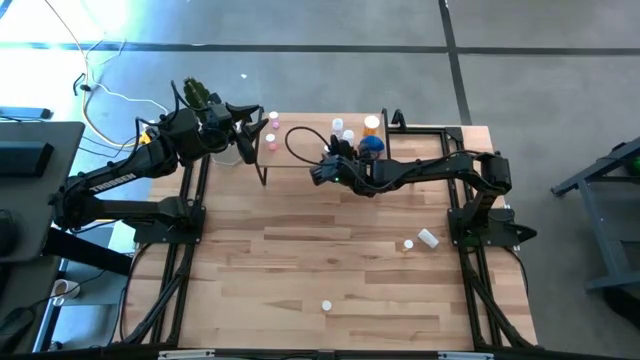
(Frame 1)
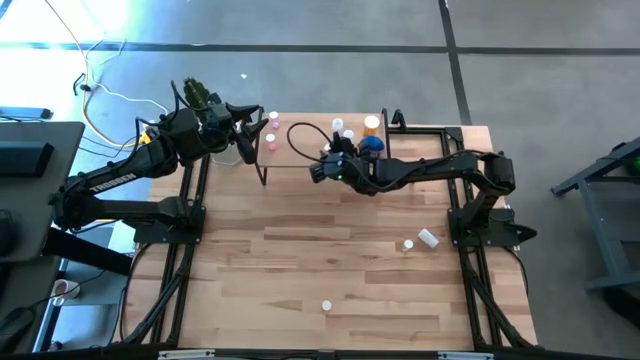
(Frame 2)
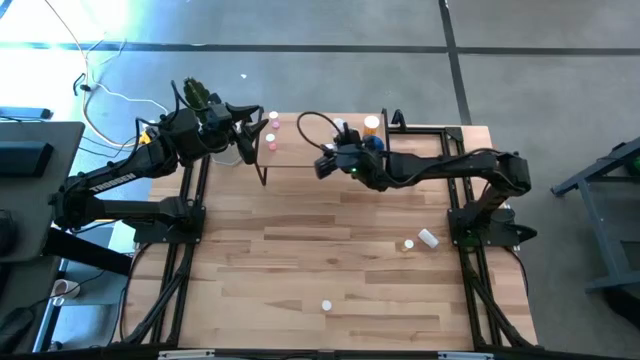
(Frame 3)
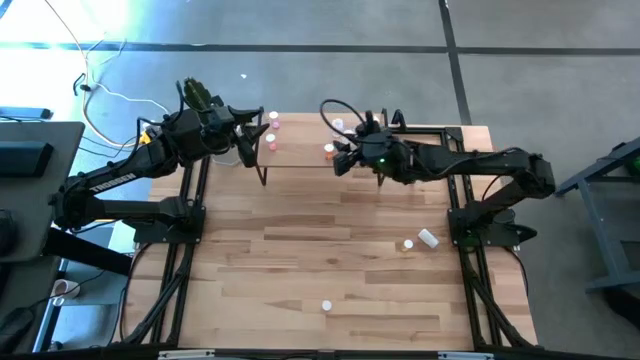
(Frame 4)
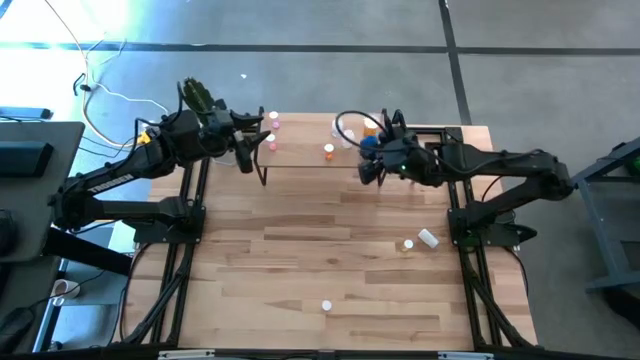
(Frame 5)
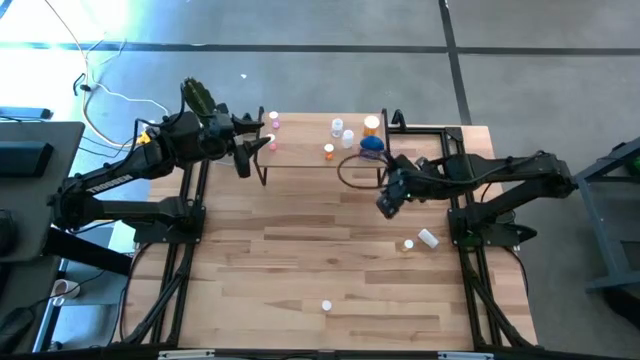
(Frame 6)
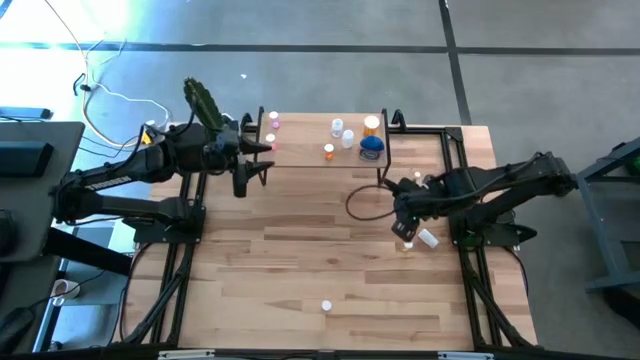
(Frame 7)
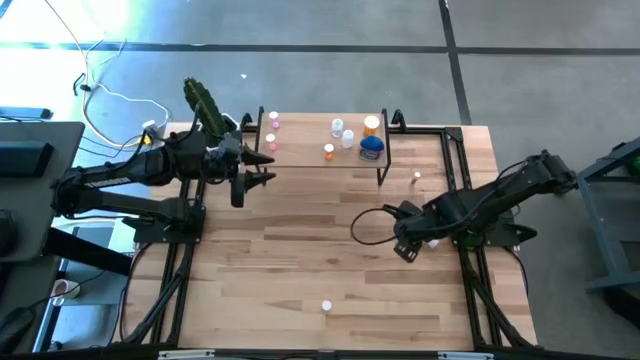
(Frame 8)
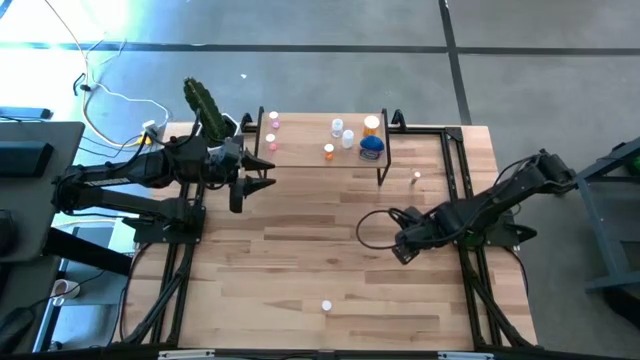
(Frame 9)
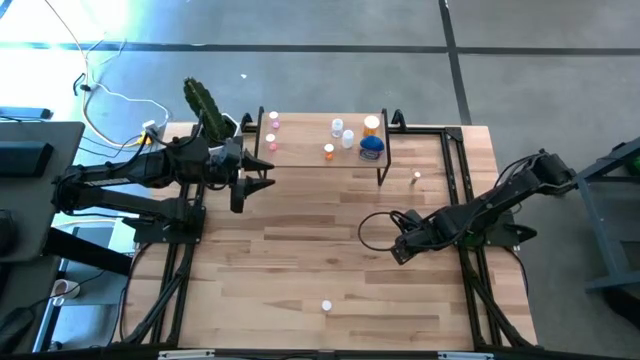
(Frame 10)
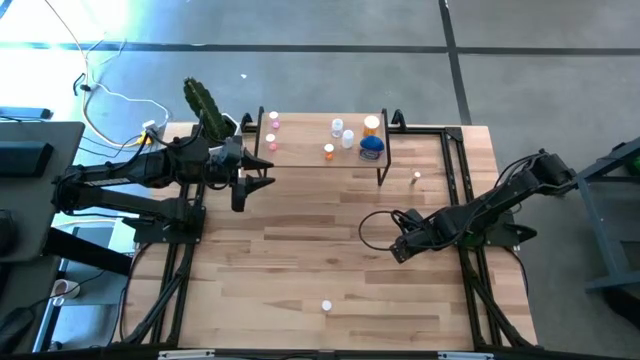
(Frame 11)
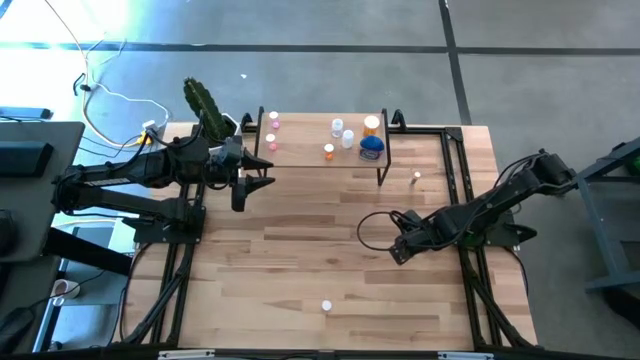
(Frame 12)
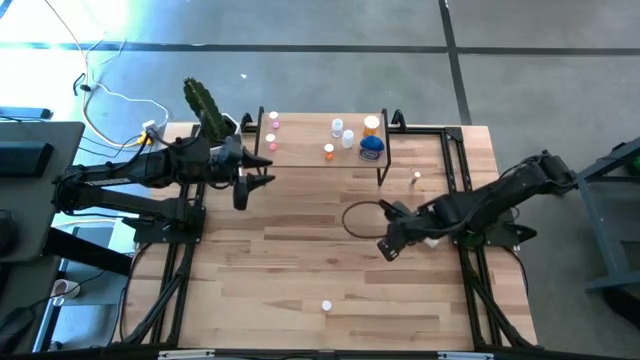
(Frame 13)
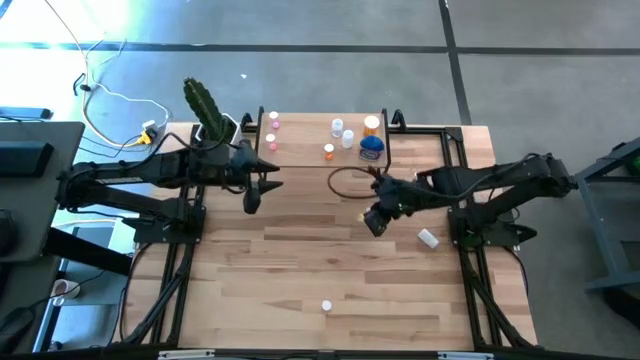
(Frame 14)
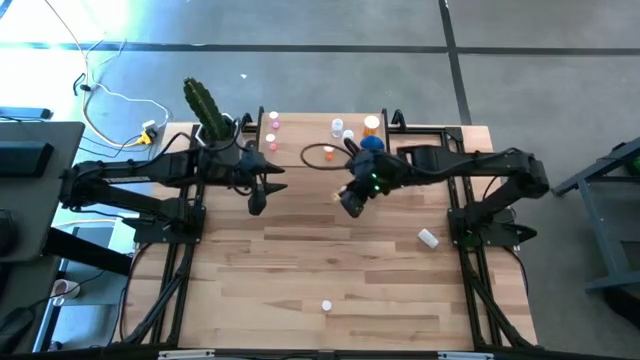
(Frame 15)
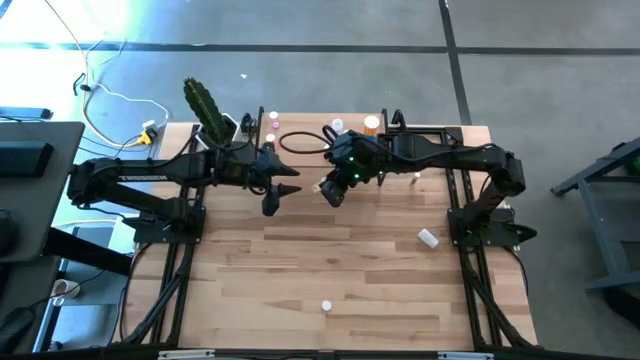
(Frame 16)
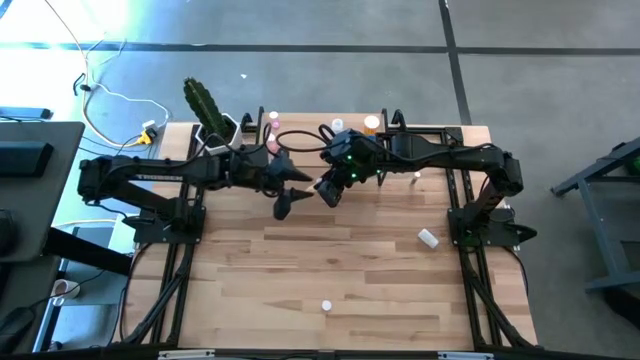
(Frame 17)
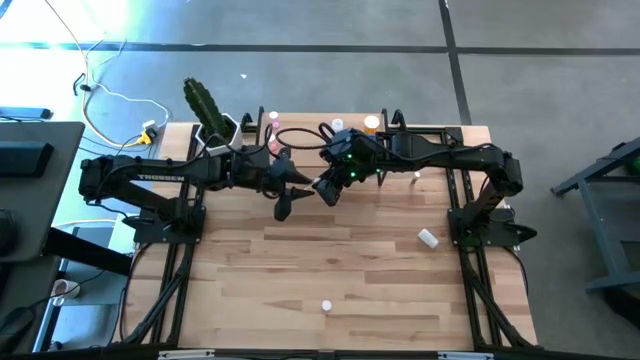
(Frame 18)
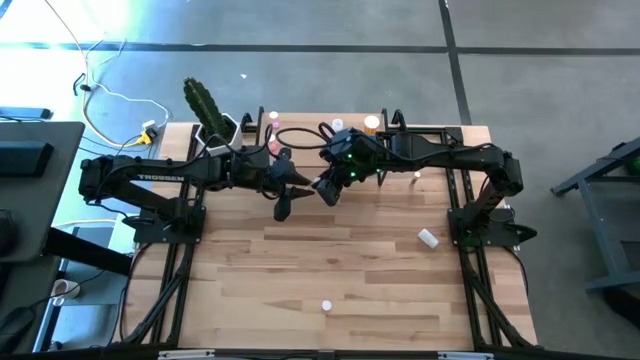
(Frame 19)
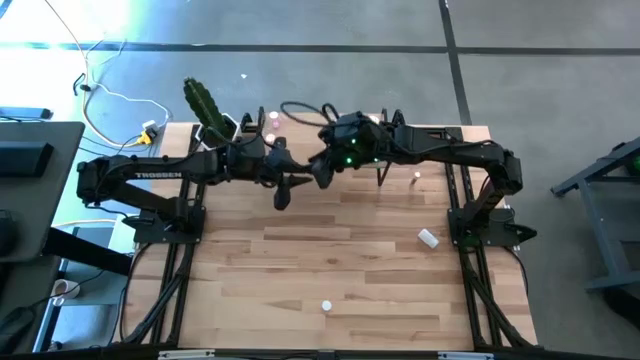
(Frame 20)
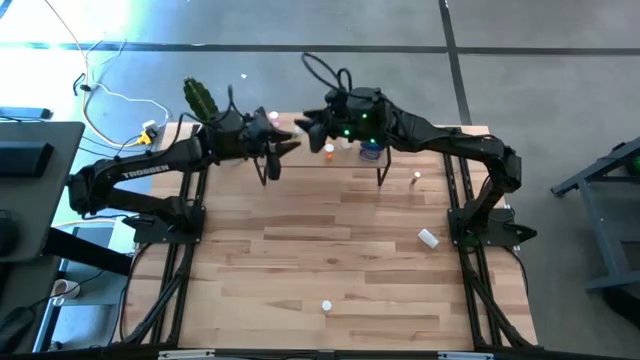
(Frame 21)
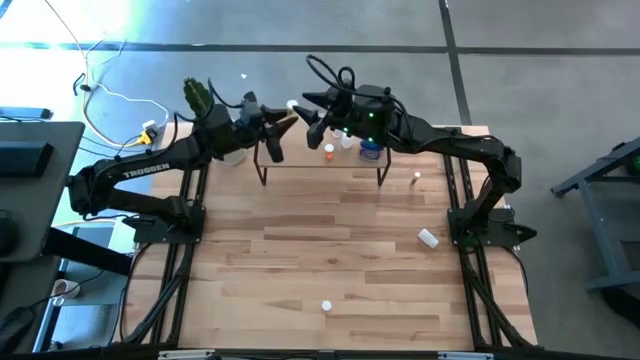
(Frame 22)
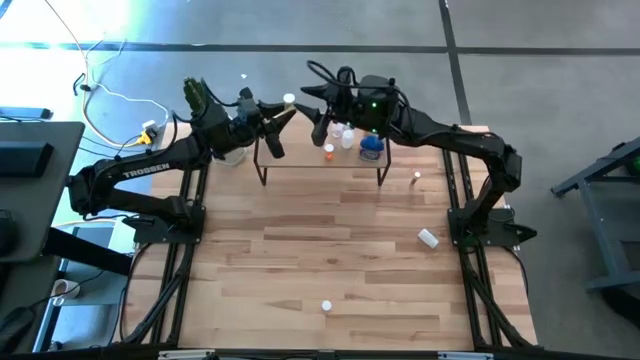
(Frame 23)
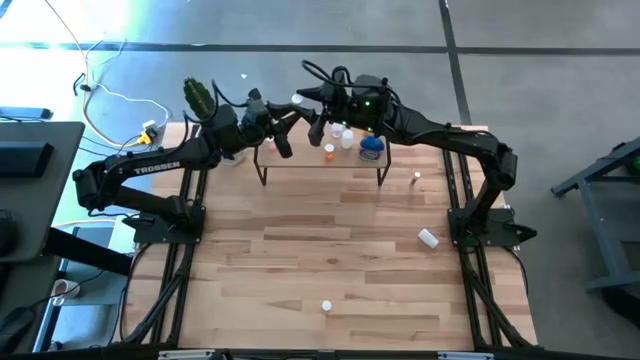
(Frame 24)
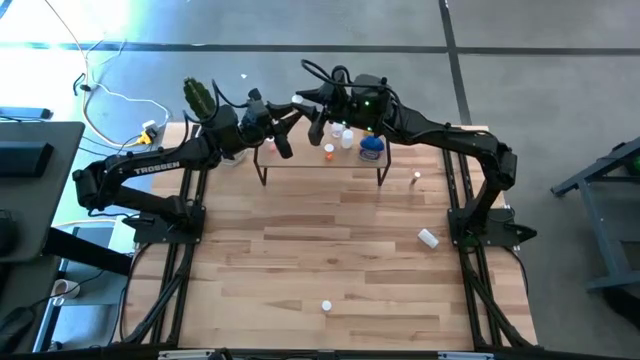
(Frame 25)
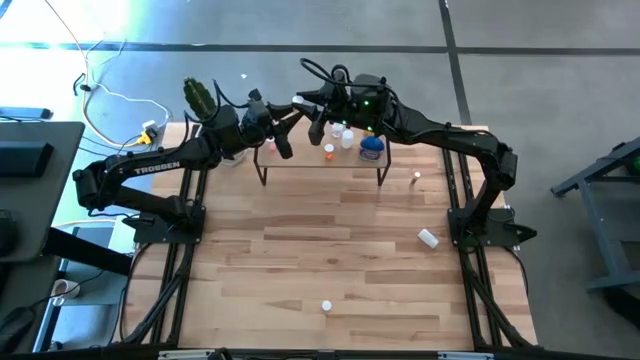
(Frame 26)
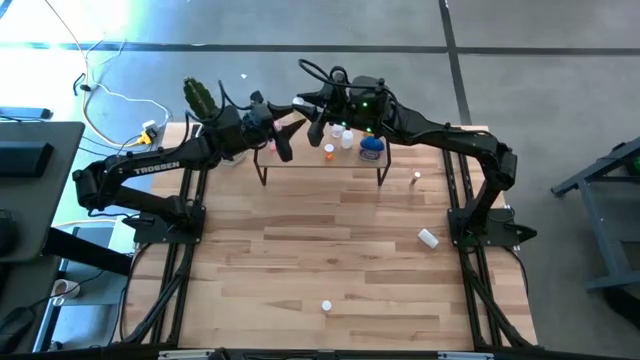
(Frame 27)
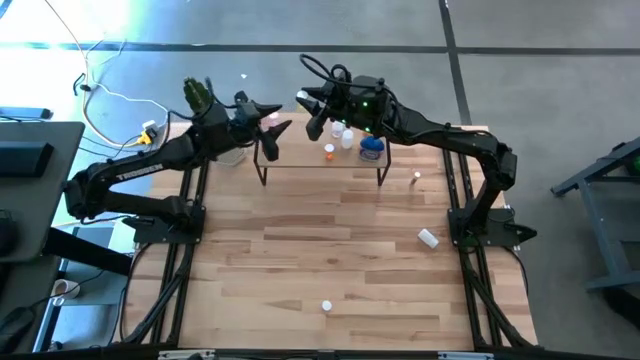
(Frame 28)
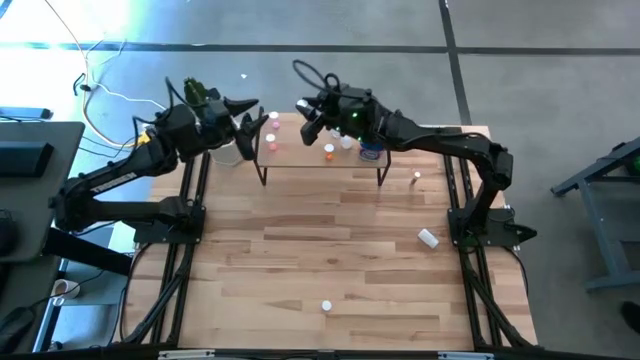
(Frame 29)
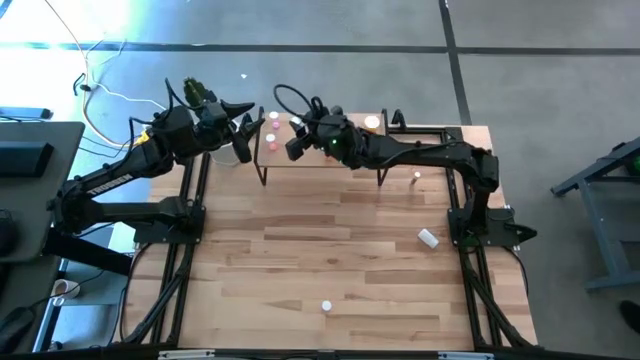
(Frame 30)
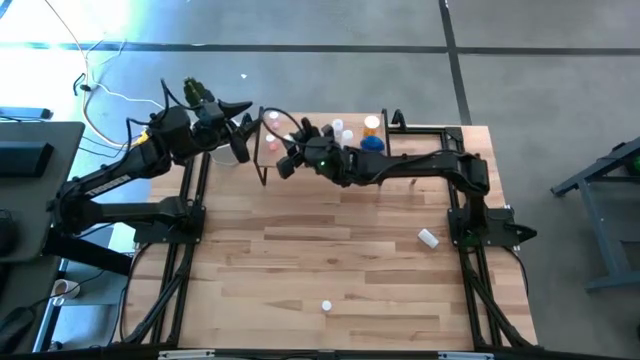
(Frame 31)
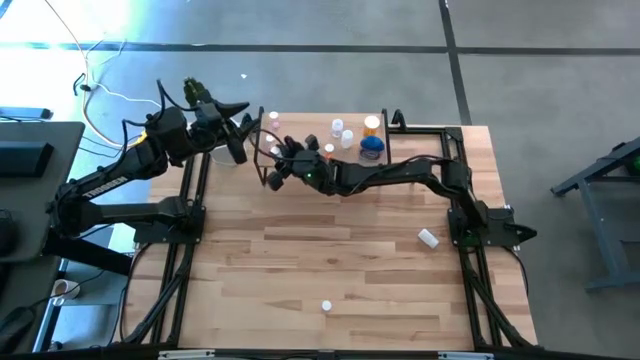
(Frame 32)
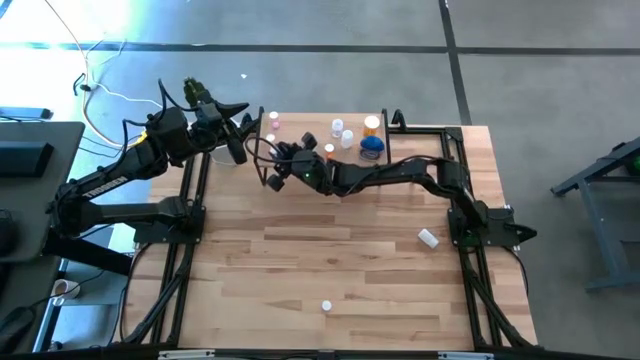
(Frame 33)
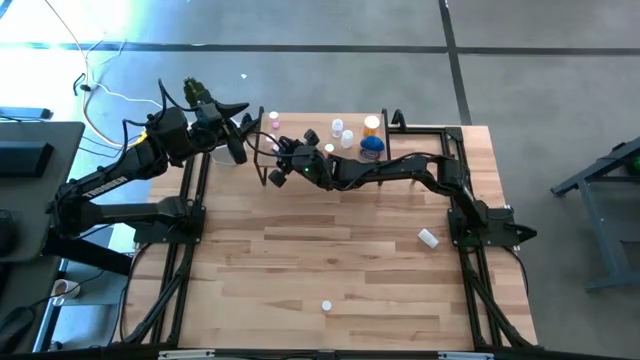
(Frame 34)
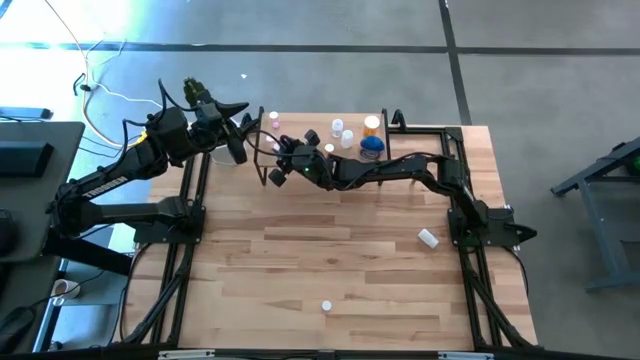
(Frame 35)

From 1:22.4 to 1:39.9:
Task: Pick and place medicine bottles onto shelf by color
Put the yellow pill bottle on the shelf

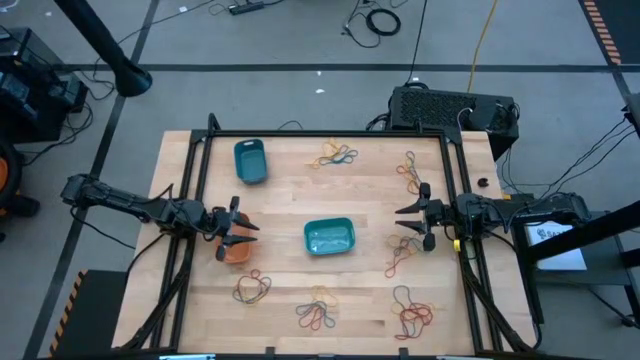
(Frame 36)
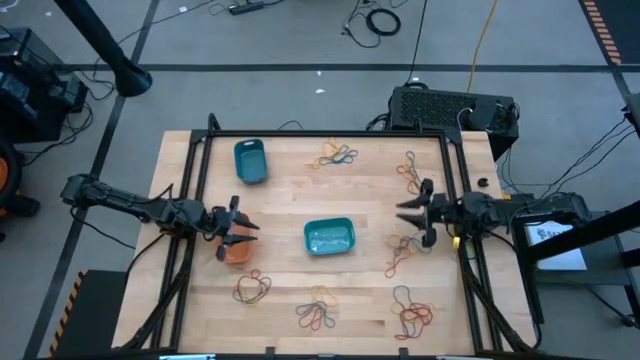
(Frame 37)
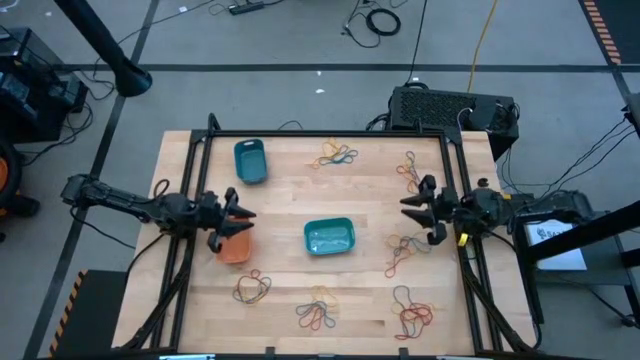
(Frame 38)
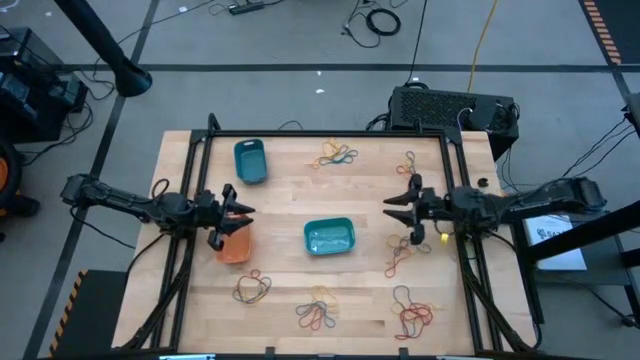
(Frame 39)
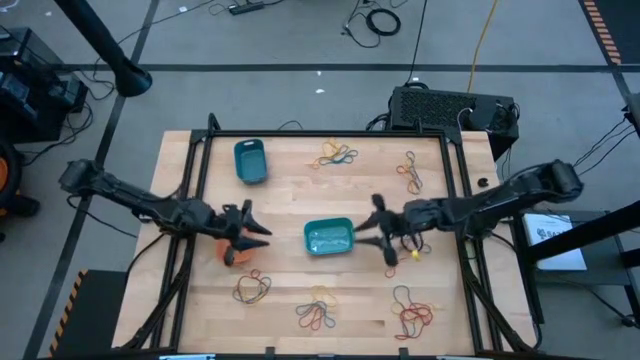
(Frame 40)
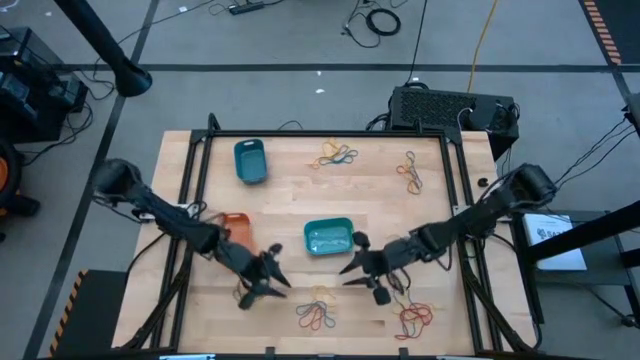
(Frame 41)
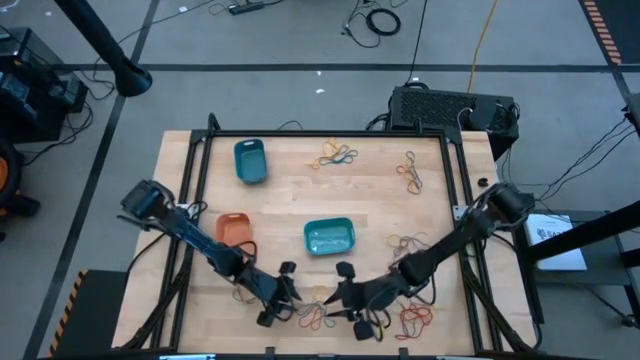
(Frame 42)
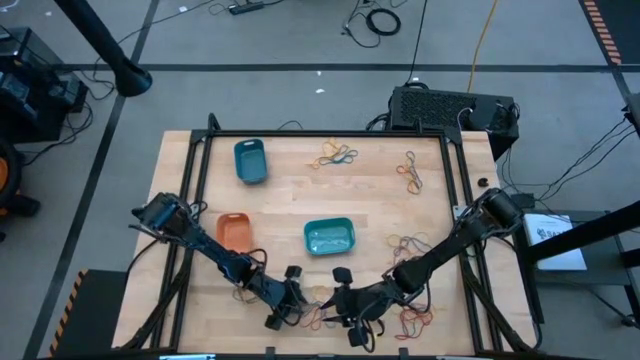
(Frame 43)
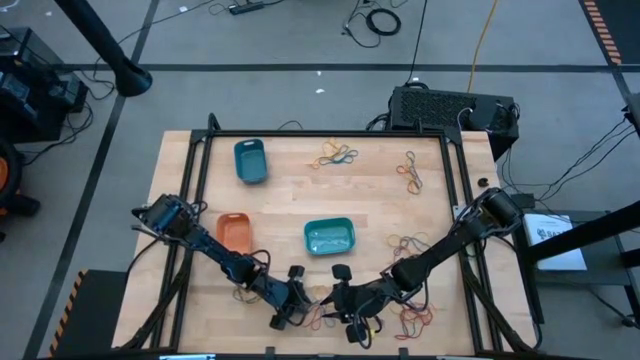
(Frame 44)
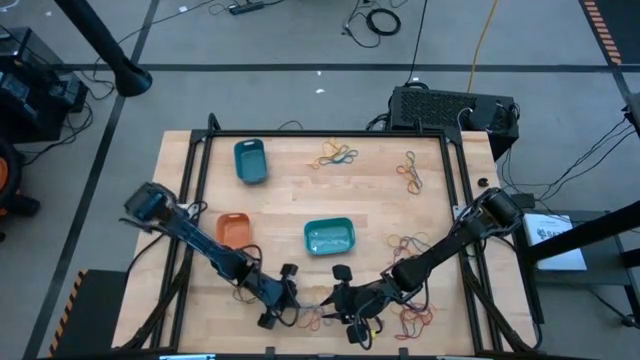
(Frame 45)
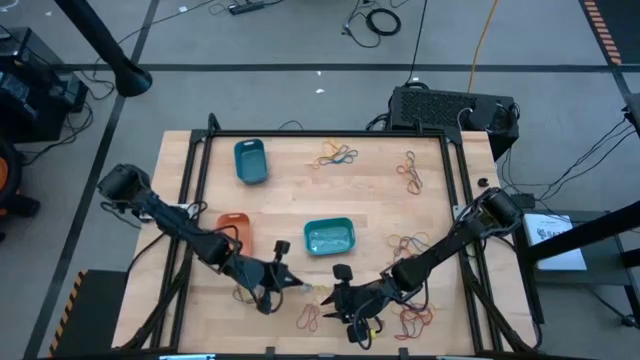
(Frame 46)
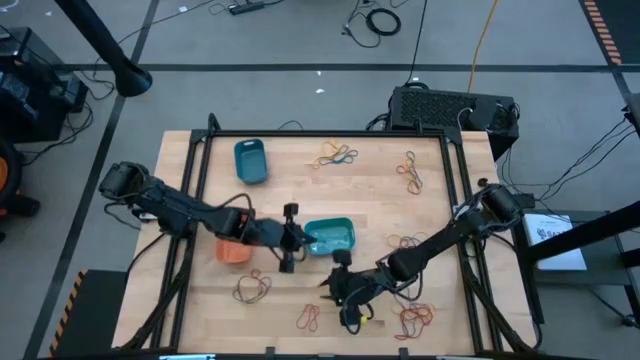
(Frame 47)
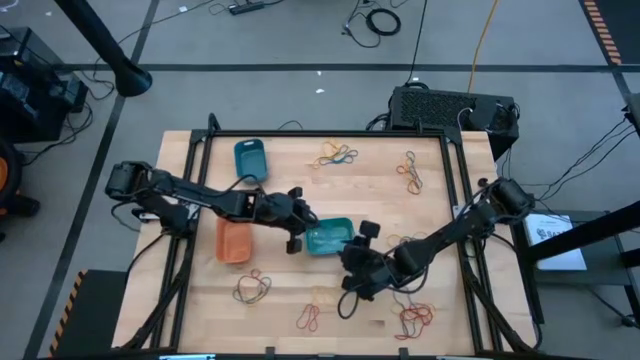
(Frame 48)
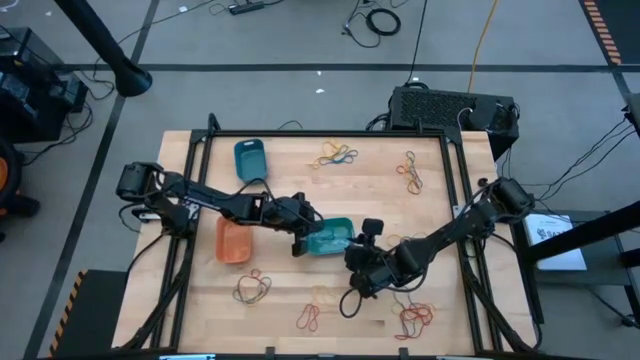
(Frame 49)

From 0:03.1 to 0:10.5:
Task: Sort rubber bands into baskets
Put the blue rubber band into the green bin
